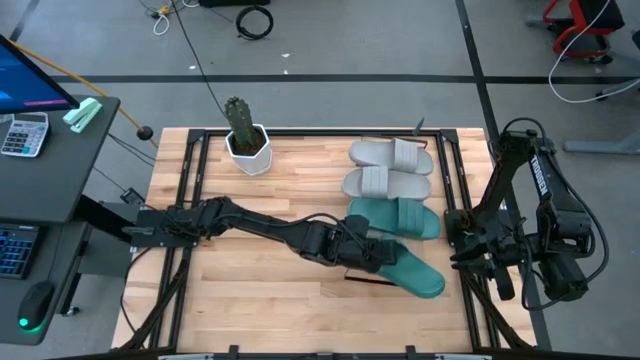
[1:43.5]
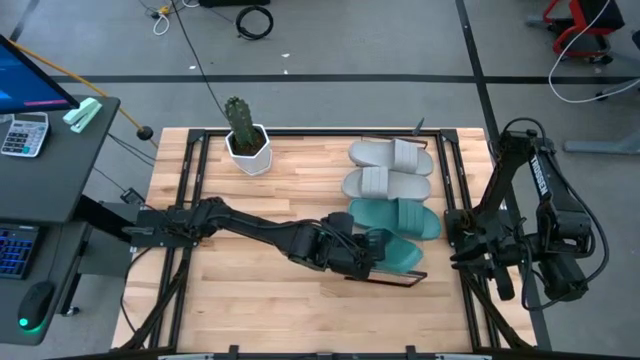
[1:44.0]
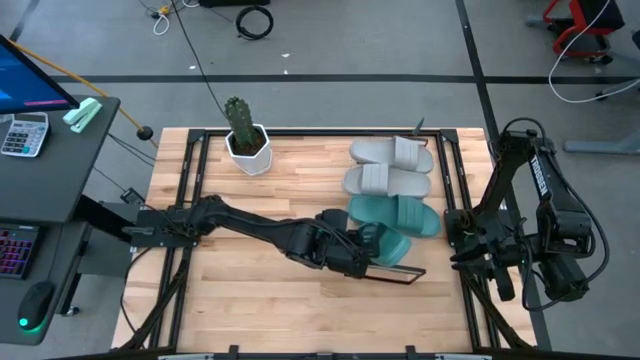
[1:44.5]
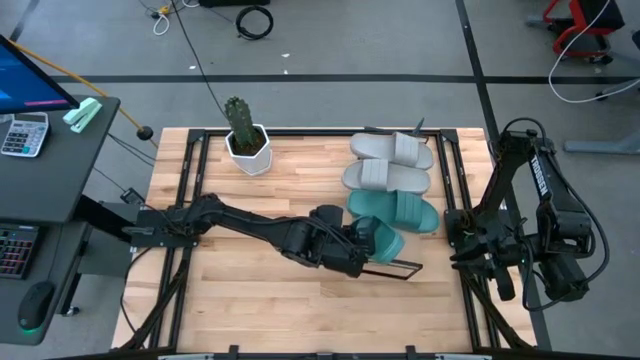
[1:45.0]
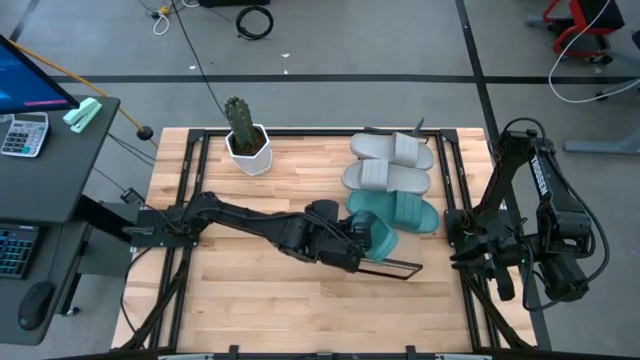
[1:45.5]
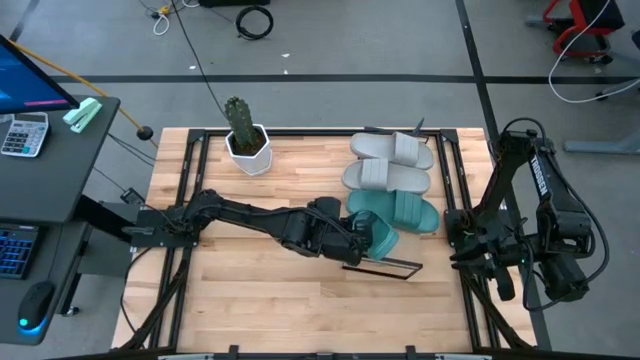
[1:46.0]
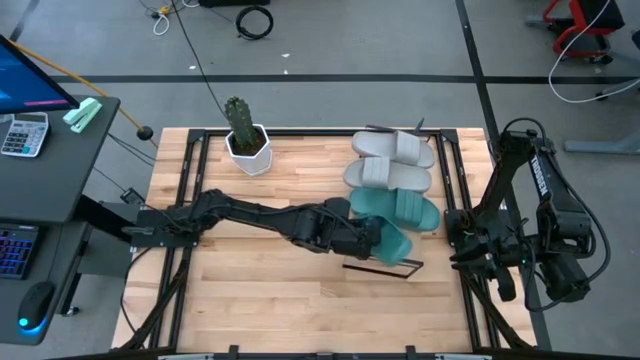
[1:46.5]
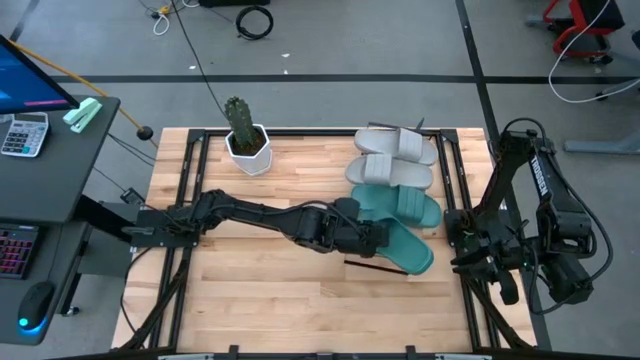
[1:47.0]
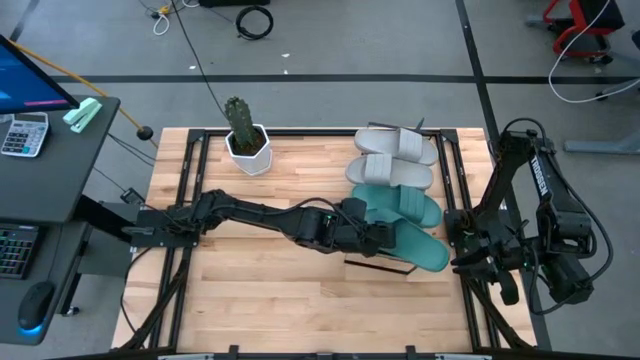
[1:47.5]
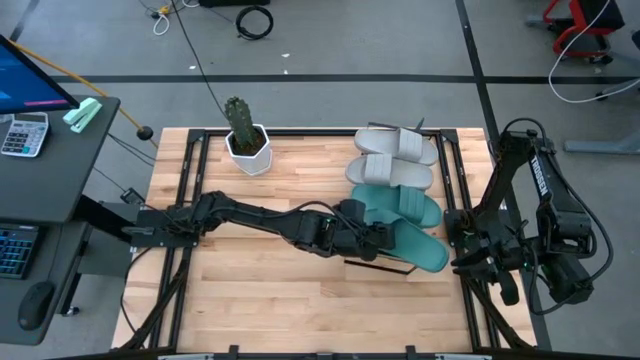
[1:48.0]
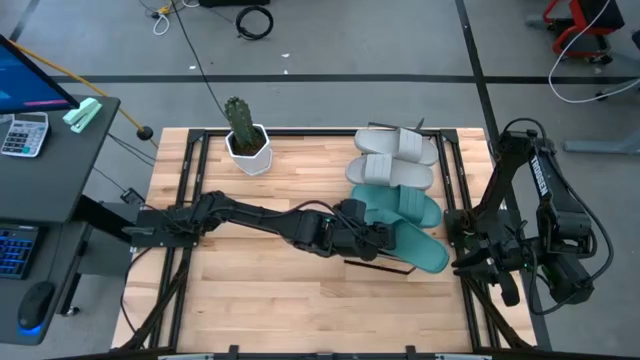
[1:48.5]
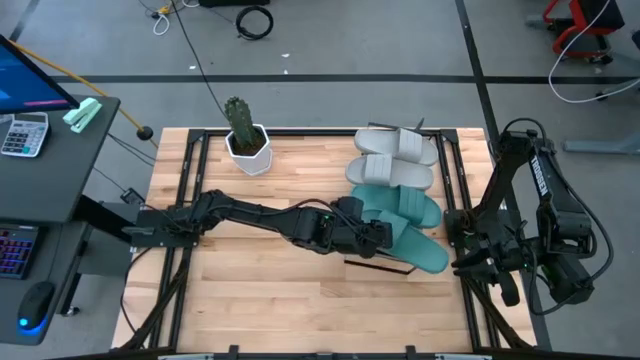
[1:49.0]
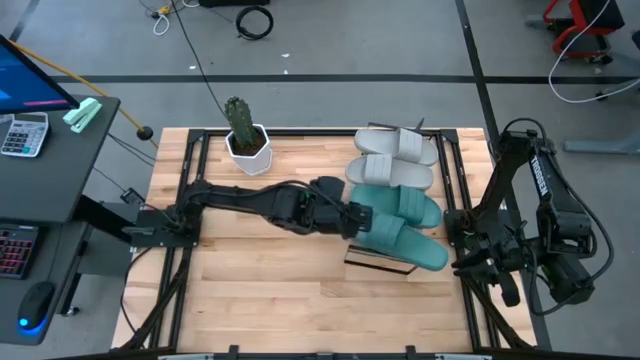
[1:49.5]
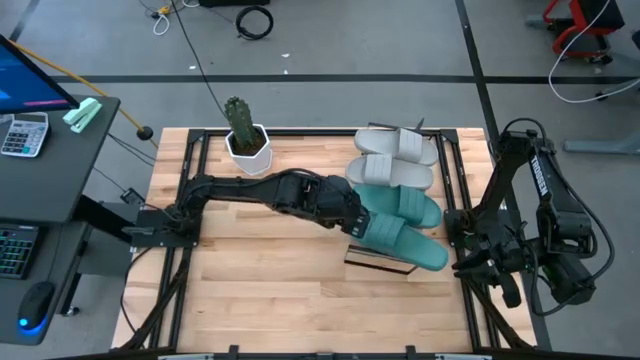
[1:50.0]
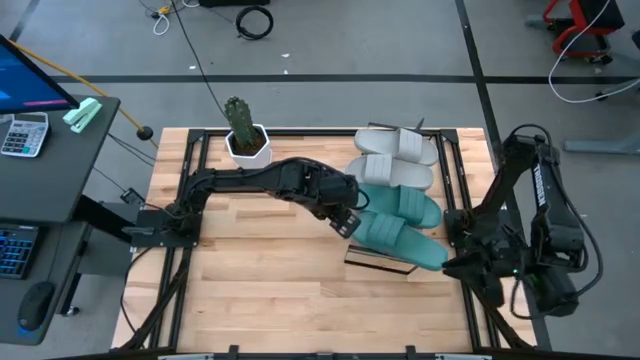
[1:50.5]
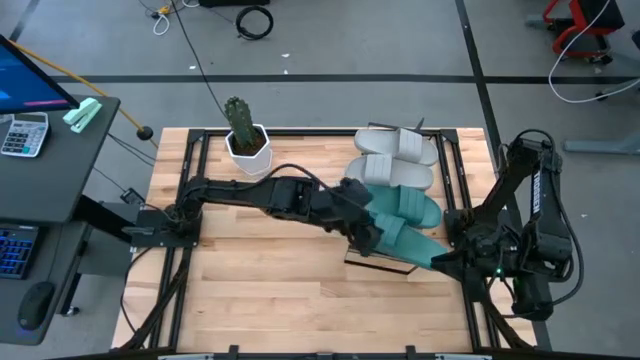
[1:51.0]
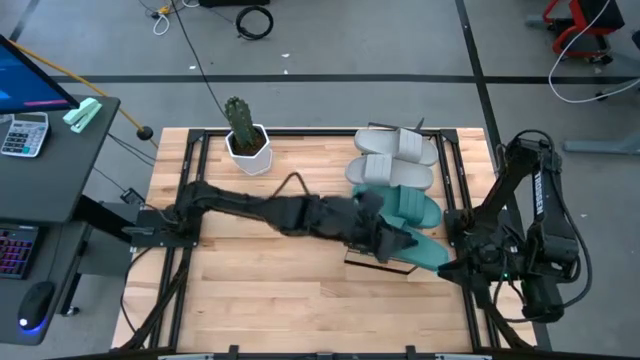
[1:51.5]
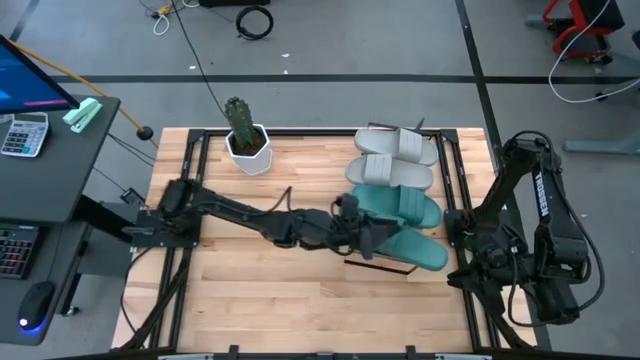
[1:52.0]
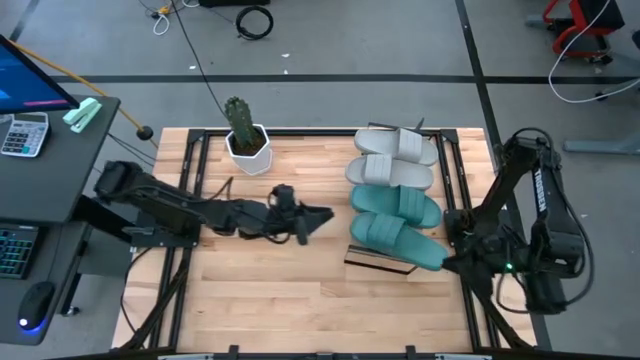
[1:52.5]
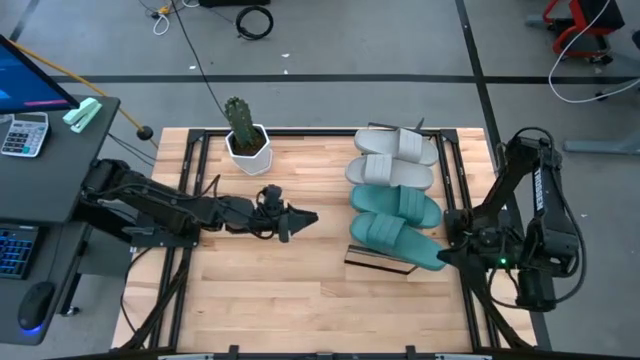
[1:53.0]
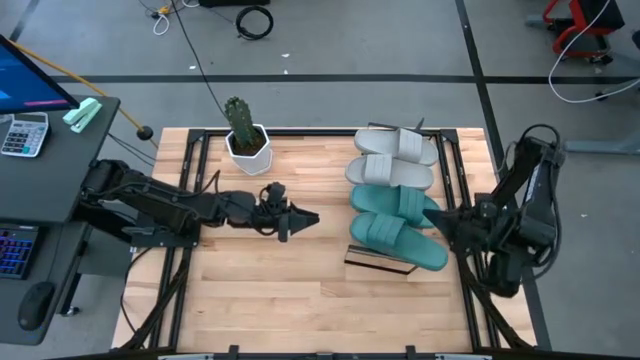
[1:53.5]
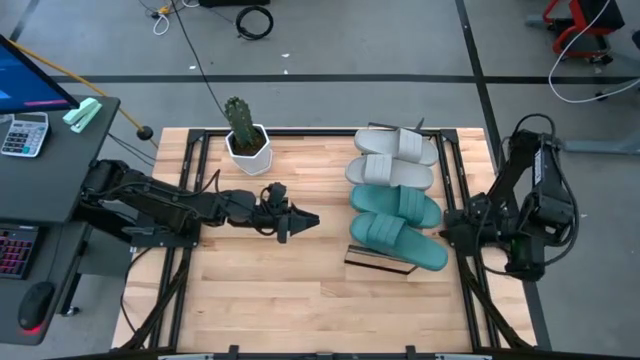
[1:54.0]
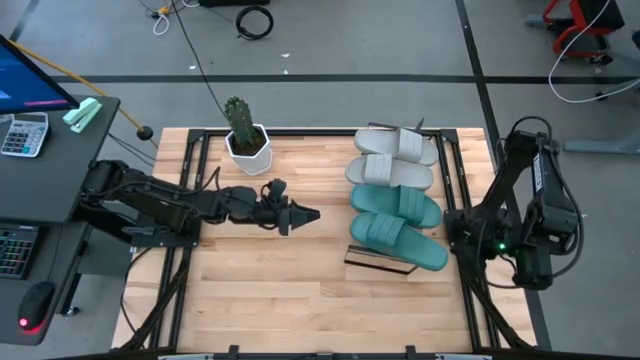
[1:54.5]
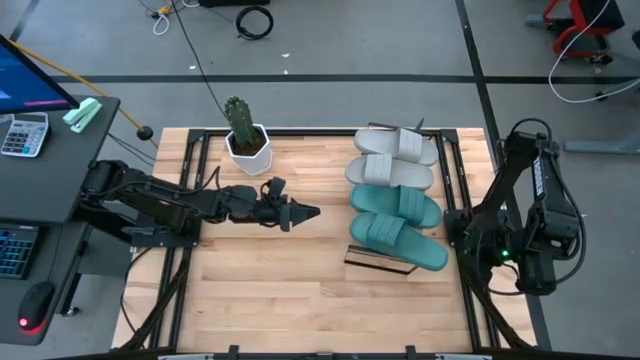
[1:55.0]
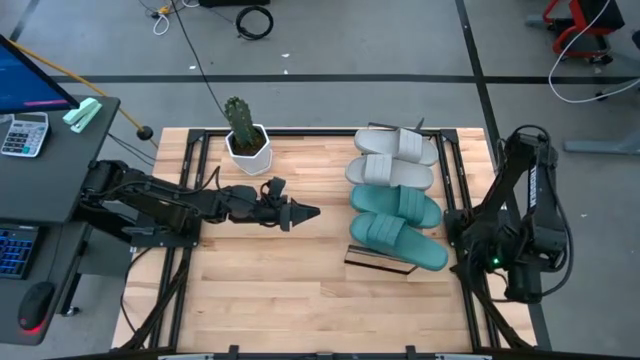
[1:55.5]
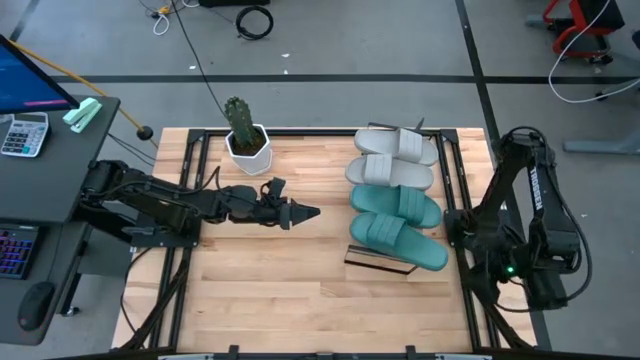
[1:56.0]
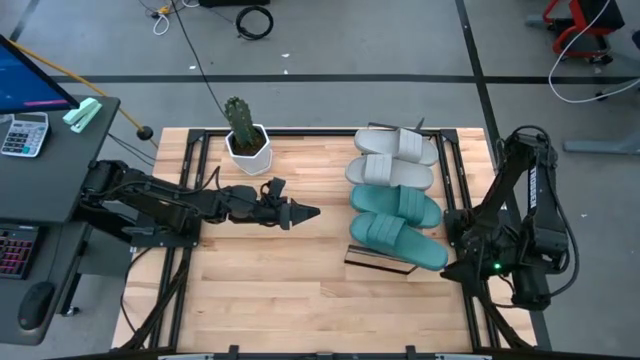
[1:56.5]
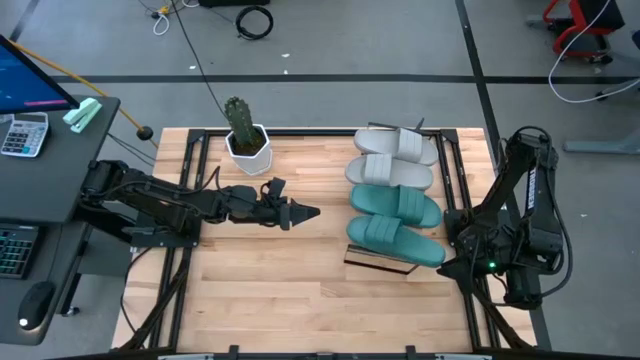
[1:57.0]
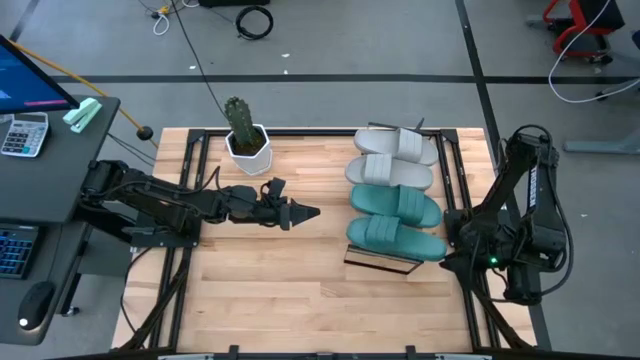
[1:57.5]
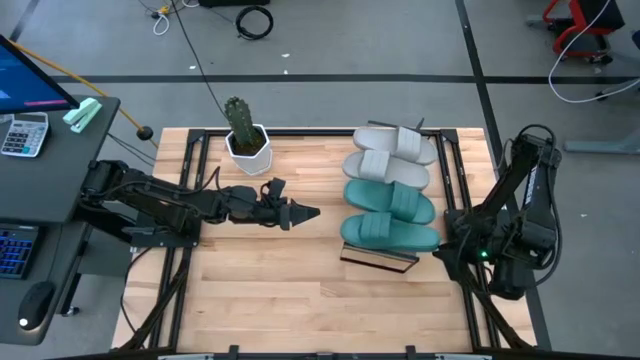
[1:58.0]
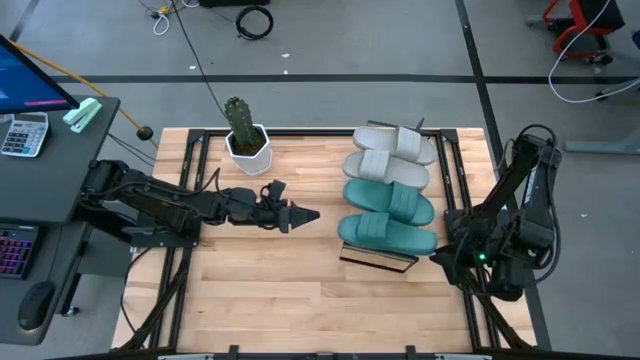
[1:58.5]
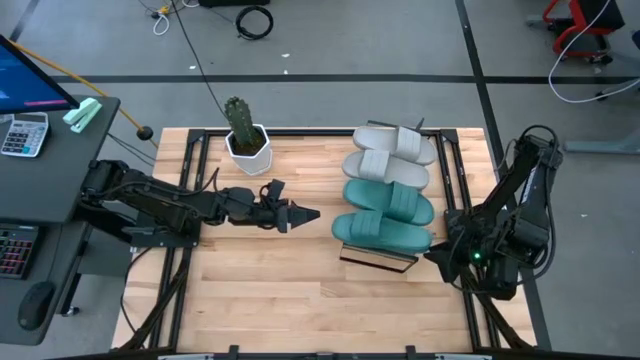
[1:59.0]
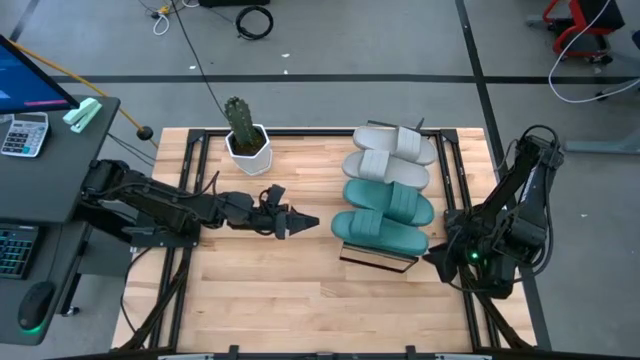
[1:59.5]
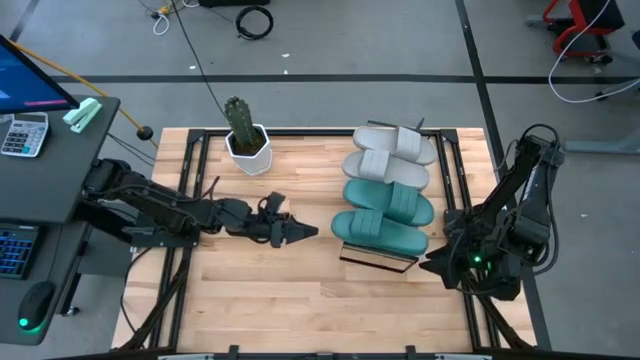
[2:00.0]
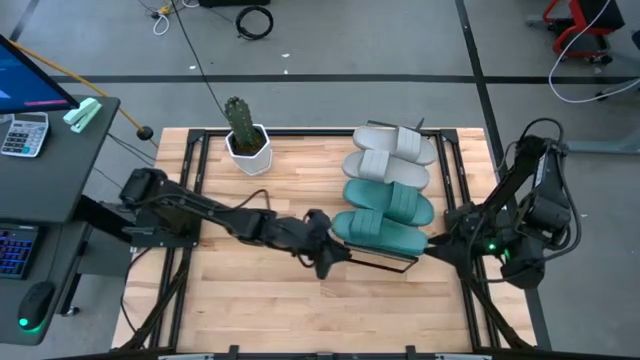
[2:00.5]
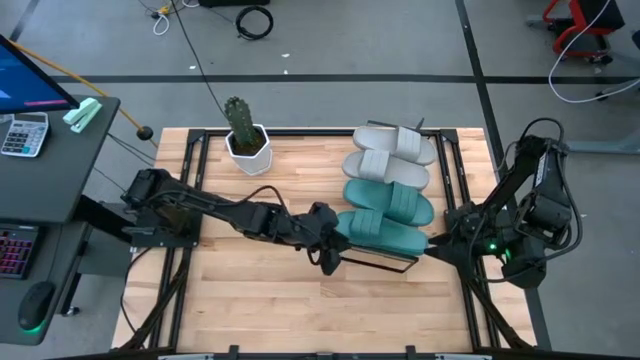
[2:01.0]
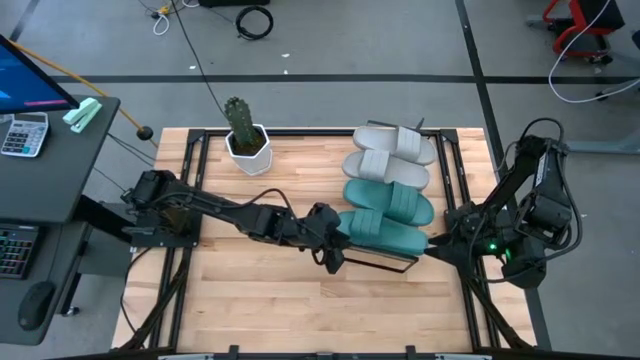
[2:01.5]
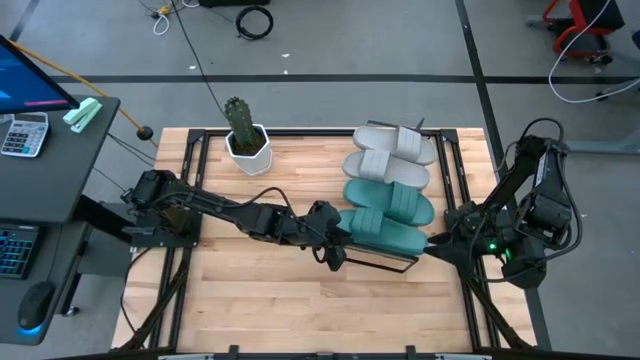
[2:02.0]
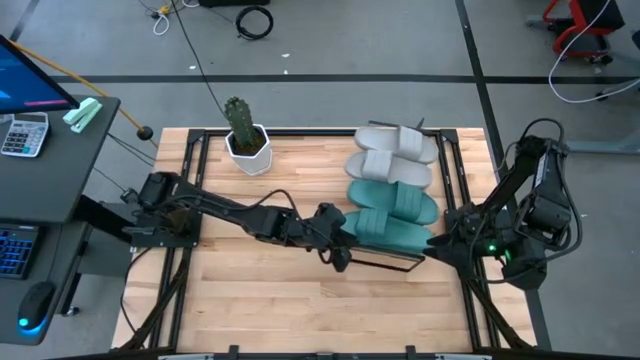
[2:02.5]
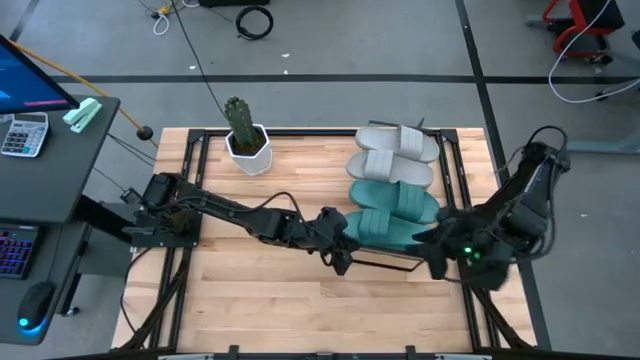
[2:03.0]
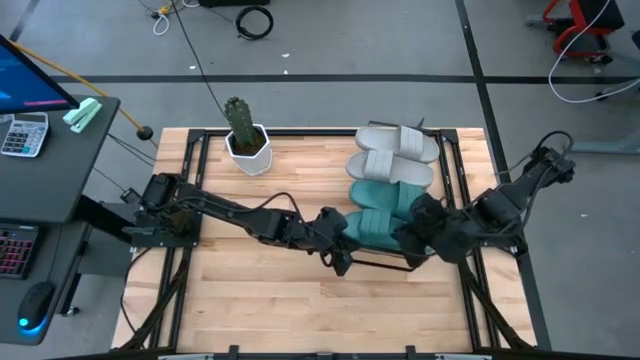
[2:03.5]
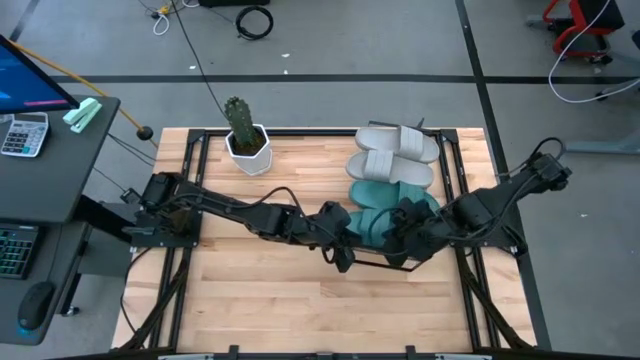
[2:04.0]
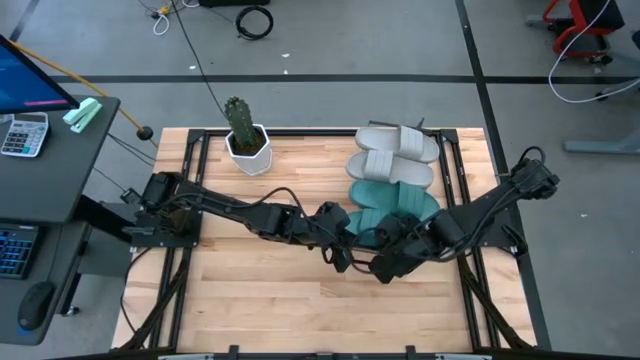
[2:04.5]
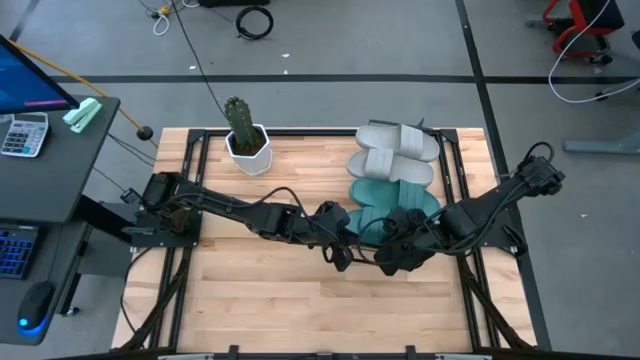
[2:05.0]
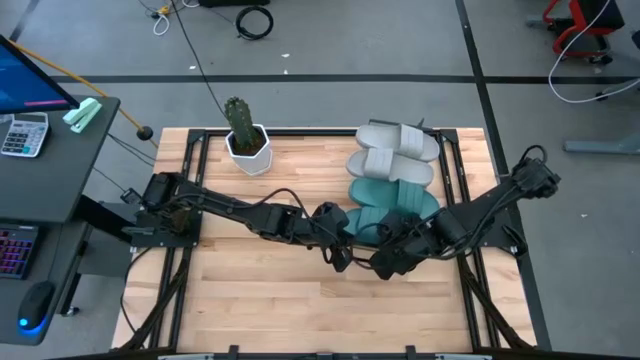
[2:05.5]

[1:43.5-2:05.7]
Task: Pick and place slides into the shelf
Put the green slide on the shelf
